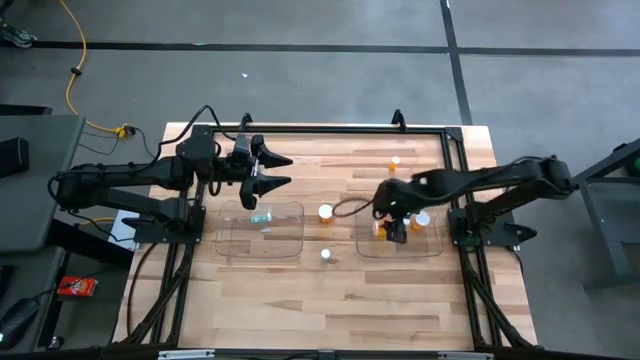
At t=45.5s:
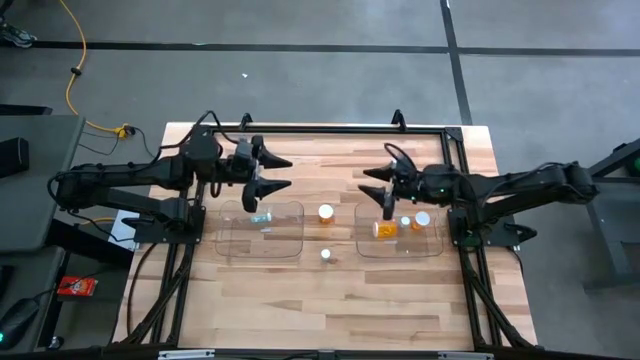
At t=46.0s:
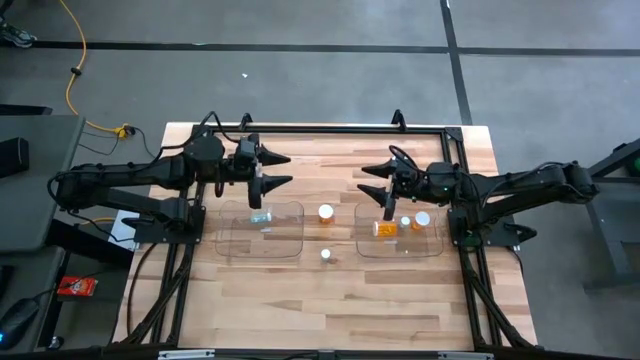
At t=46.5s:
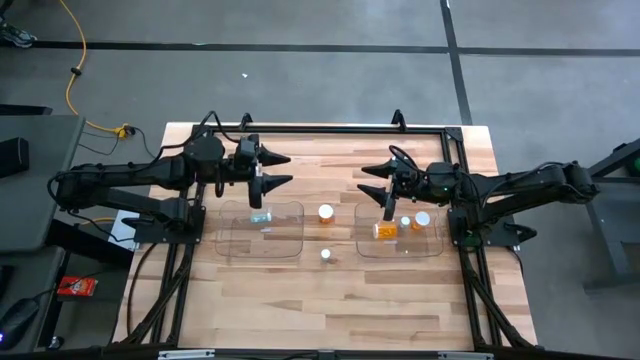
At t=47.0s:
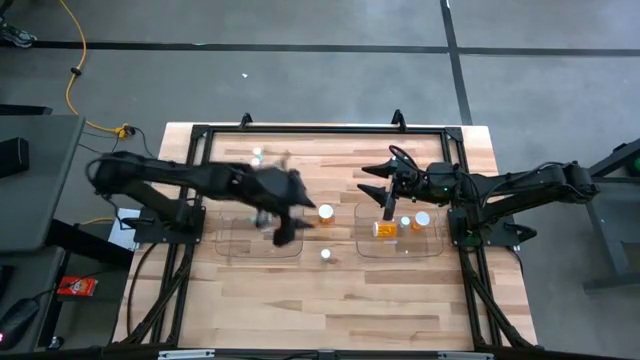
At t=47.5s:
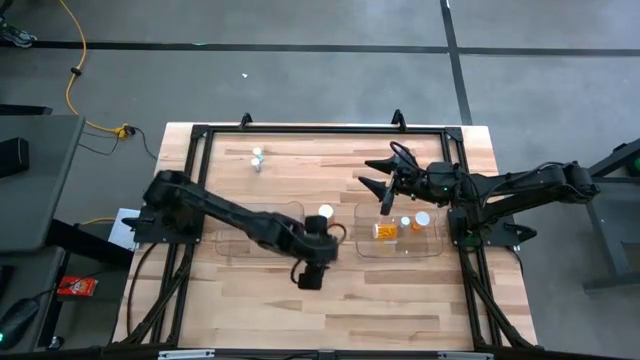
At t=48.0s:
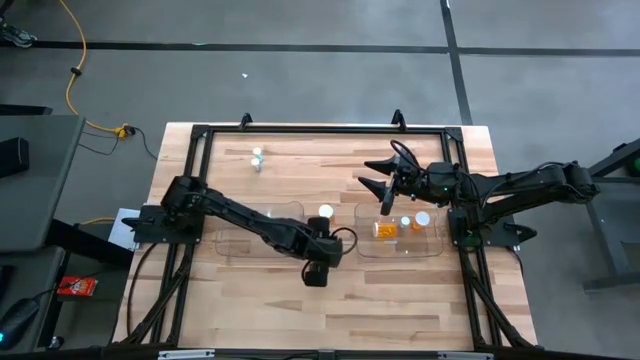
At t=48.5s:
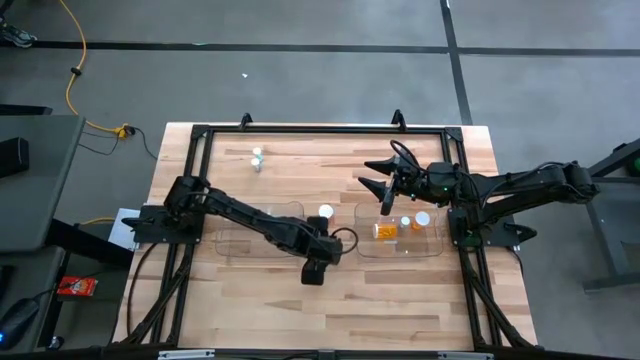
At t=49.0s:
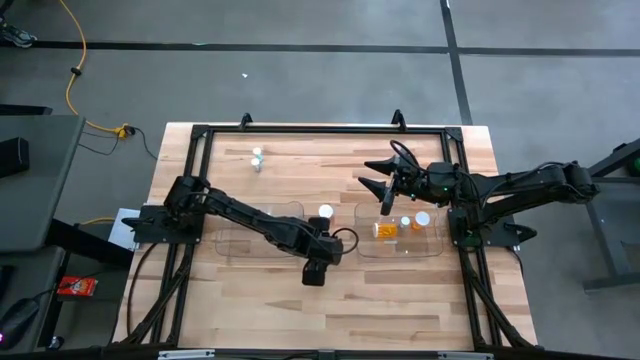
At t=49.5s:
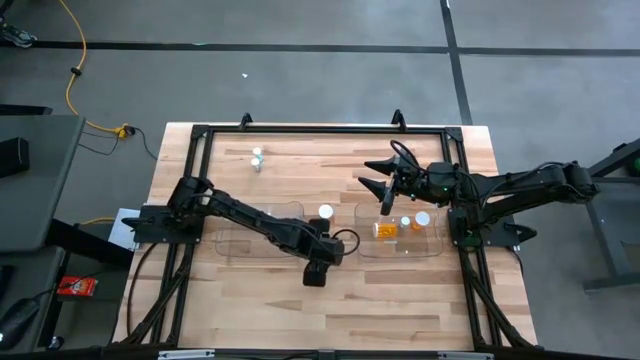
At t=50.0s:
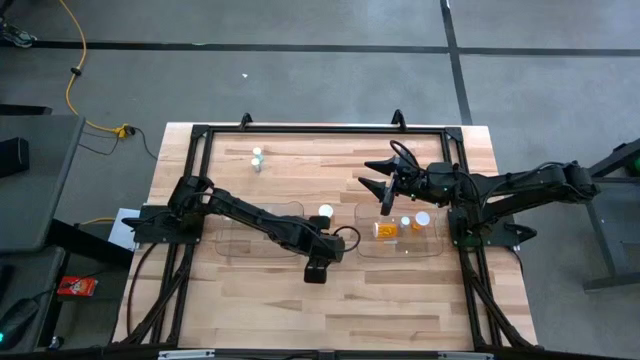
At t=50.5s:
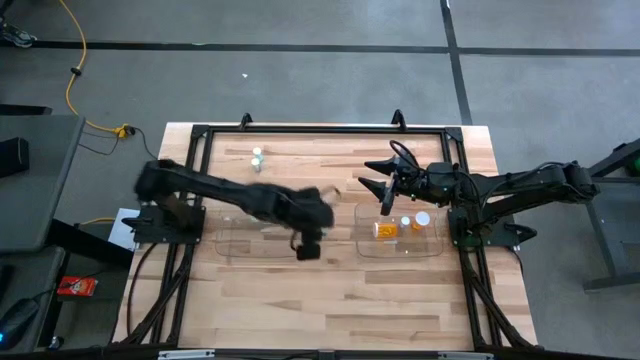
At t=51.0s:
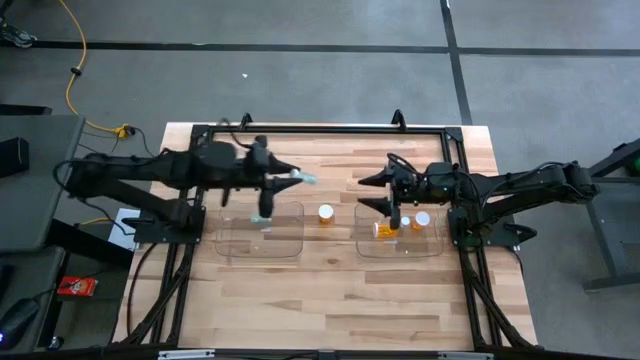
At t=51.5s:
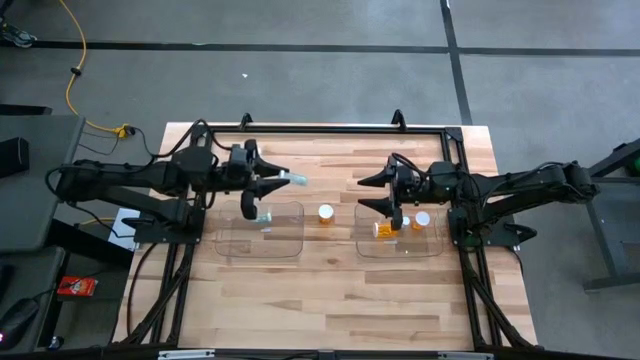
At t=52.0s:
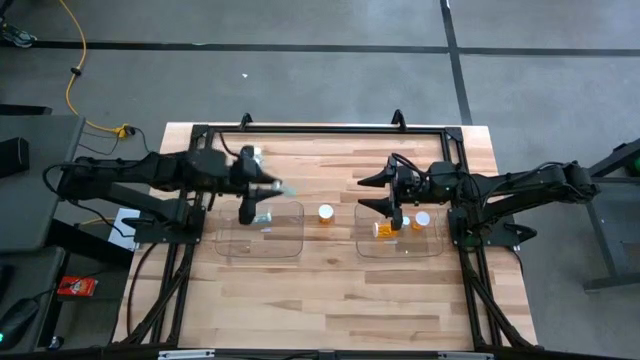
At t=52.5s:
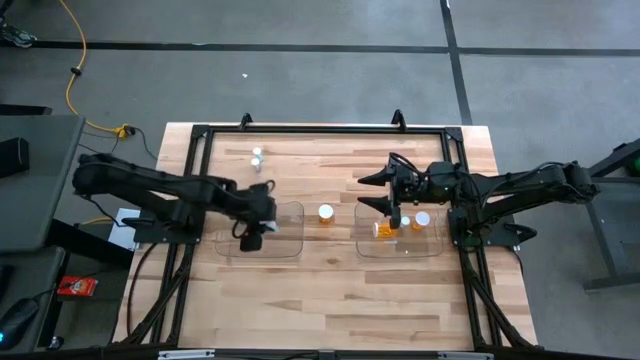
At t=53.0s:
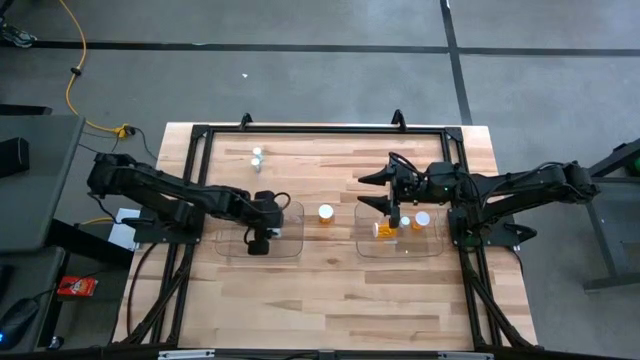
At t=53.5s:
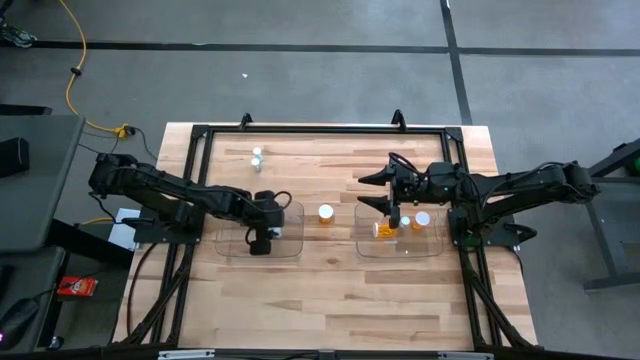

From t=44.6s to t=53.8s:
Task: Pick and place medicine bottles into bin by pill shape (circle, oval)
Put the bottom blue tablet bottle into the left transparent bin

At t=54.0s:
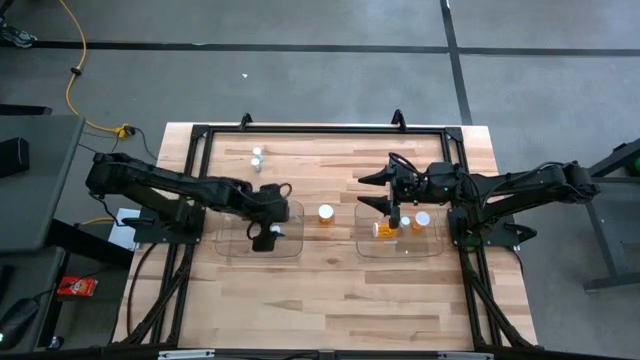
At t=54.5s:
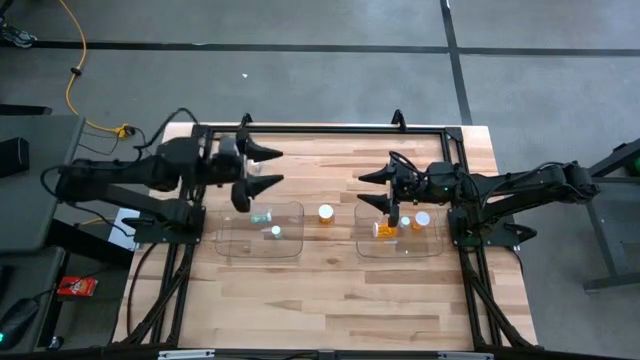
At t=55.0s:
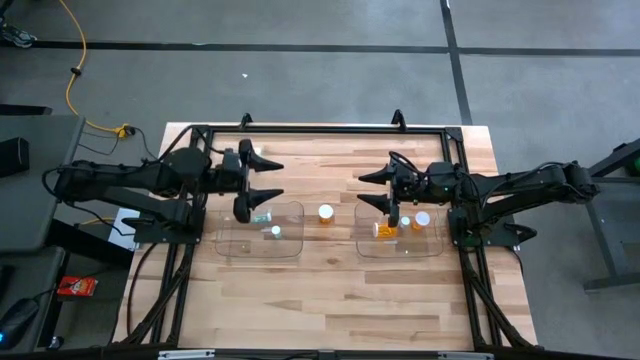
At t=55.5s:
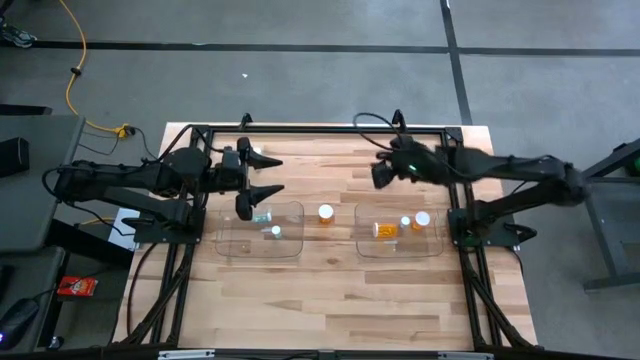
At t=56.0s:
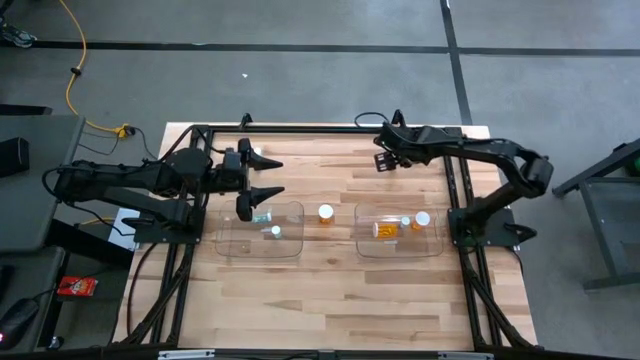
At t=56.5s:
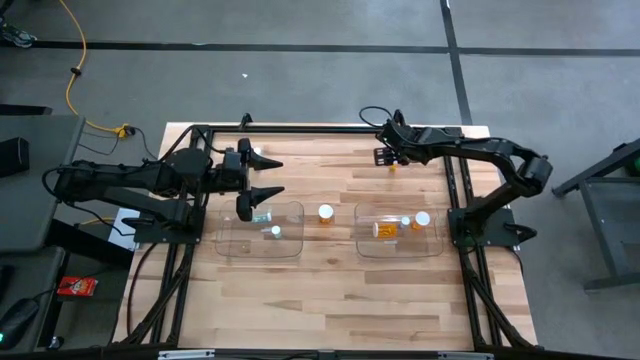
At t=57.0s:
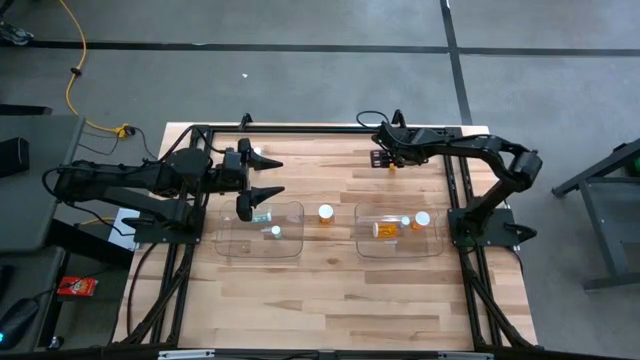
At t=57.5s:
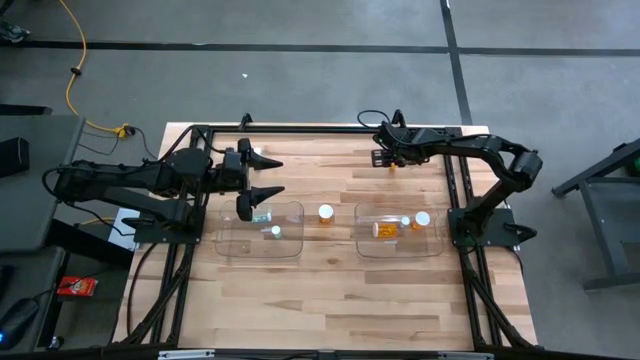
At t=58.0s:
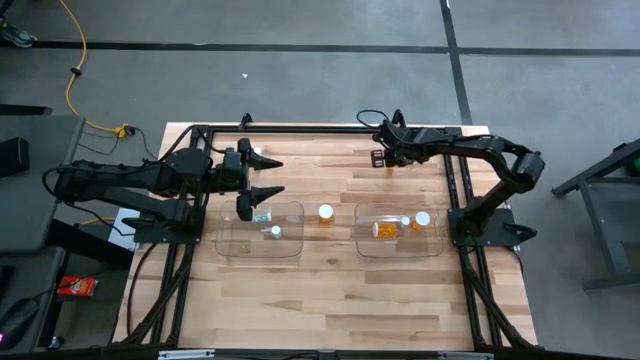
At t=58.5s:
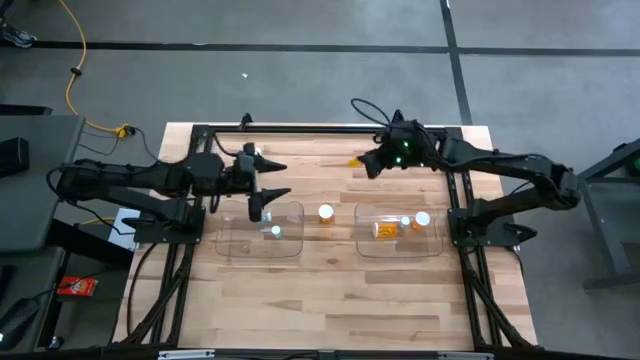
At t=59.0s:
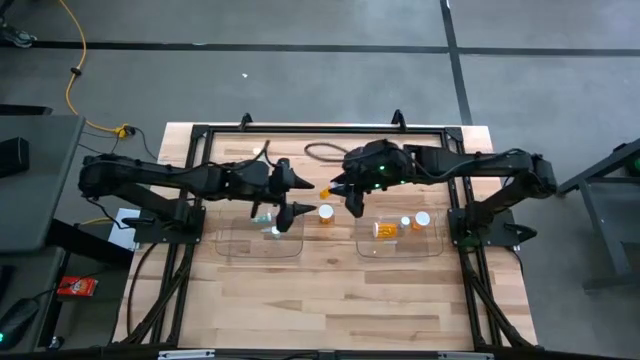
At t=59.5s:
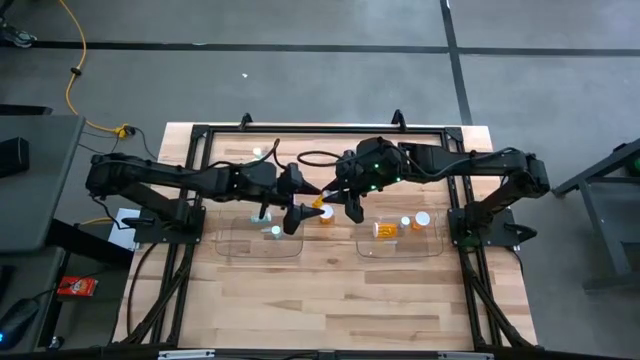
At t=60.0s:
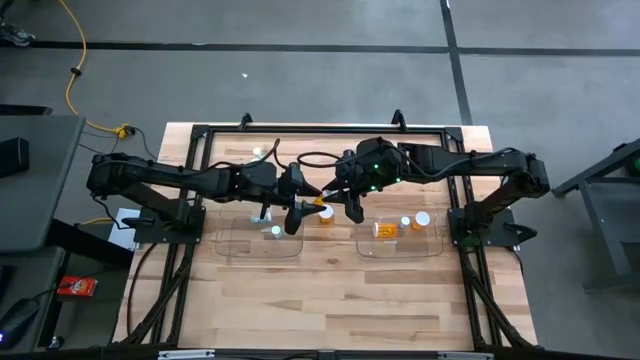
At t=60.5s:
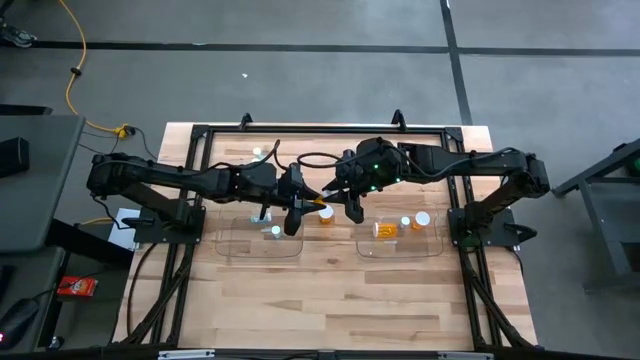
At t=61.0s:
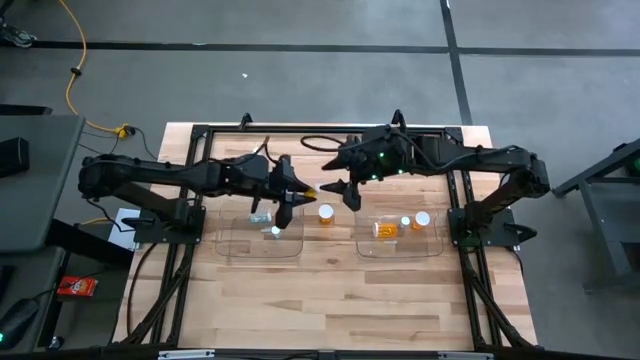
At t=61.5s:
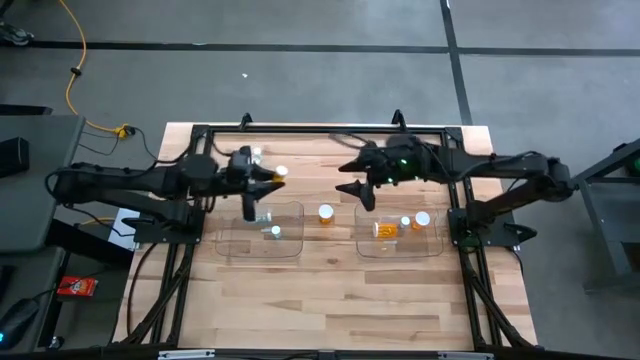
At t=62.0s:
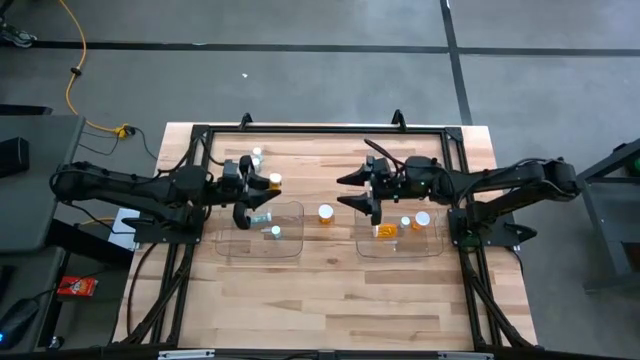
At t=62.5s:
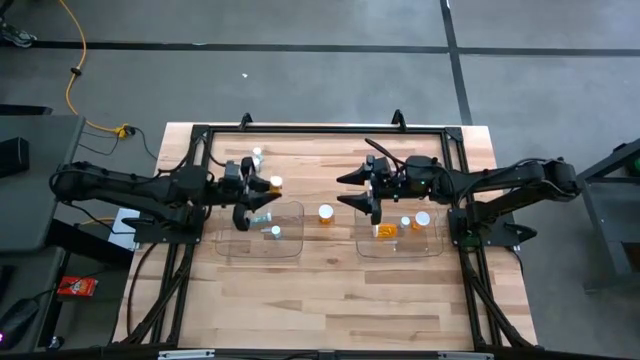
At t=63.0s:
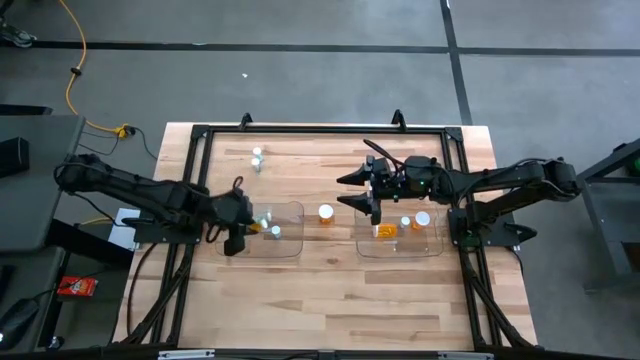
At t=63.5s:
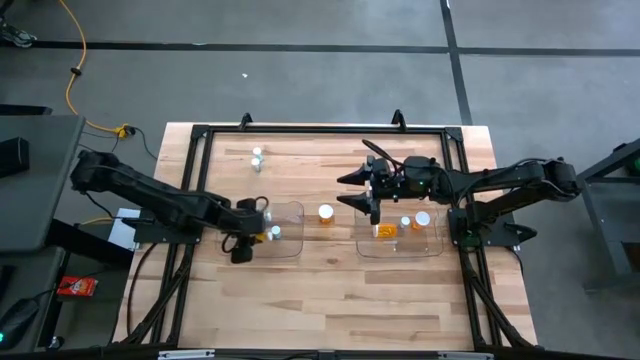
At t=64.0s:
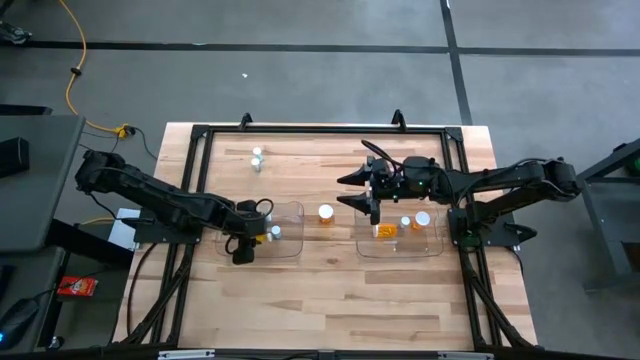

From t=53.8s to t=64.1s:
Put the orange tablet bottle into the left transparent bin
